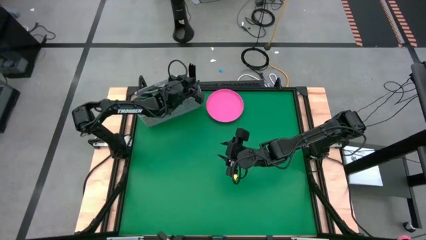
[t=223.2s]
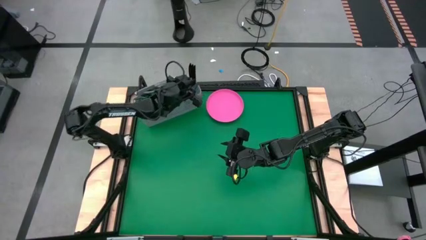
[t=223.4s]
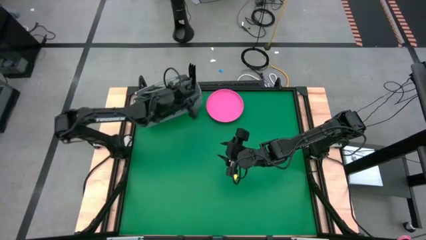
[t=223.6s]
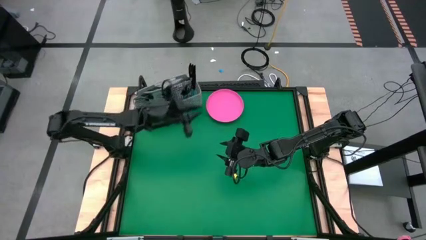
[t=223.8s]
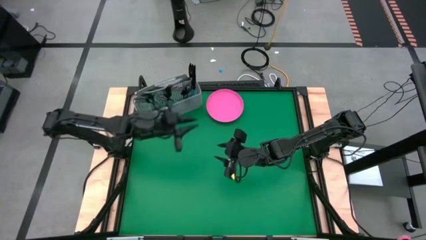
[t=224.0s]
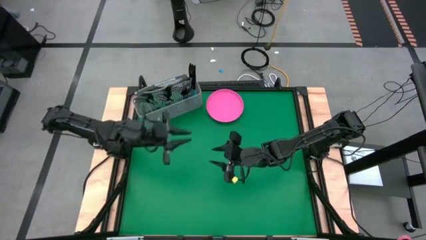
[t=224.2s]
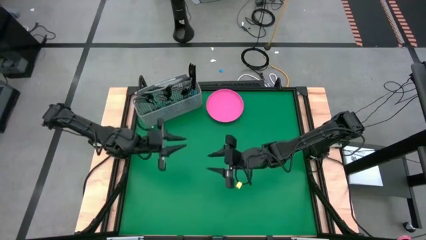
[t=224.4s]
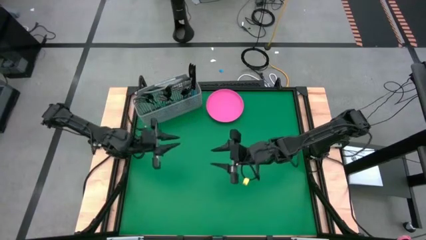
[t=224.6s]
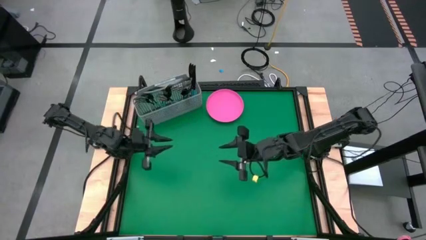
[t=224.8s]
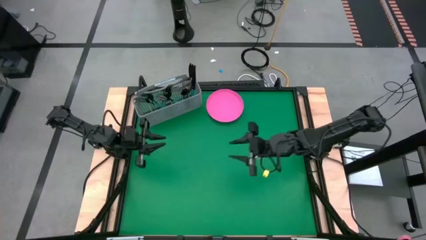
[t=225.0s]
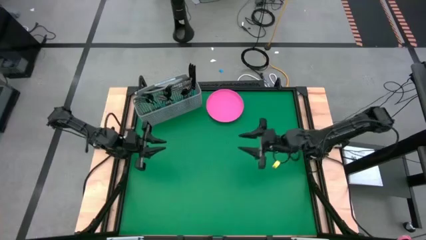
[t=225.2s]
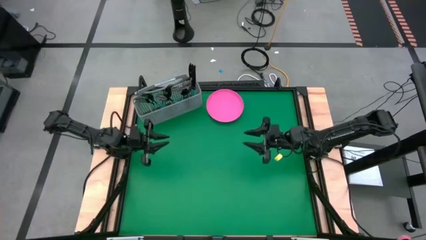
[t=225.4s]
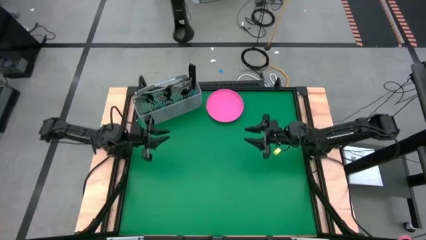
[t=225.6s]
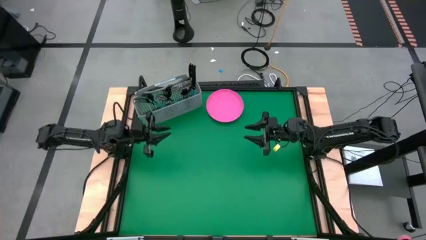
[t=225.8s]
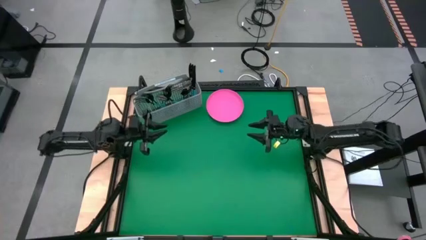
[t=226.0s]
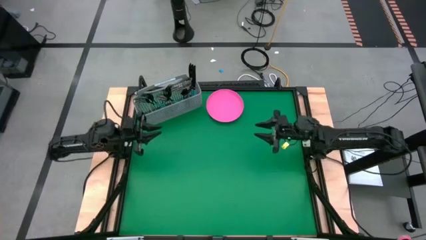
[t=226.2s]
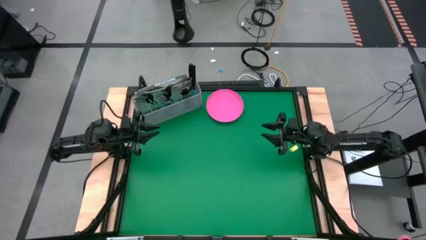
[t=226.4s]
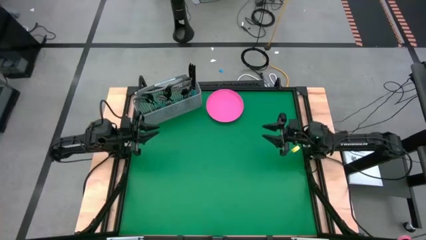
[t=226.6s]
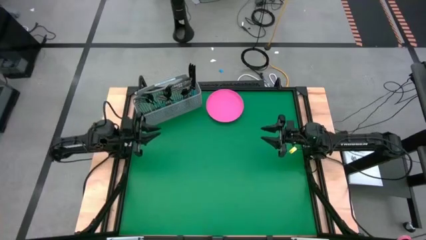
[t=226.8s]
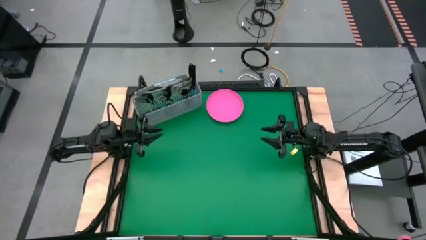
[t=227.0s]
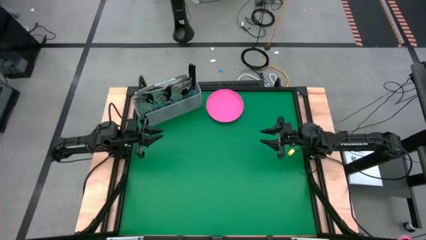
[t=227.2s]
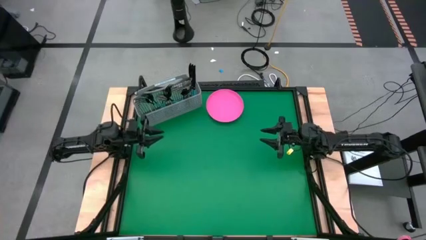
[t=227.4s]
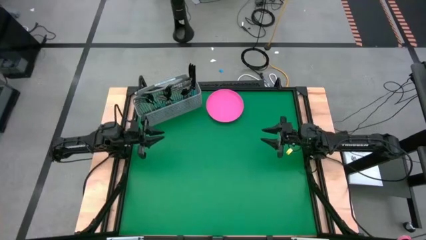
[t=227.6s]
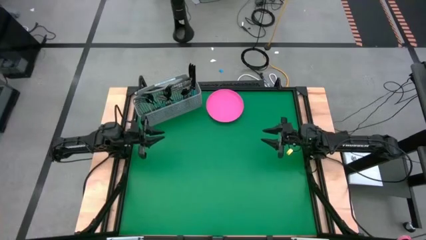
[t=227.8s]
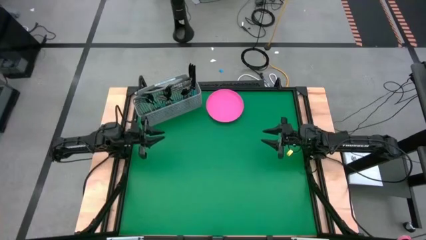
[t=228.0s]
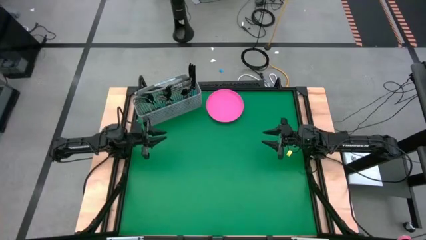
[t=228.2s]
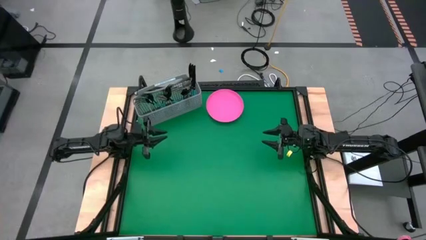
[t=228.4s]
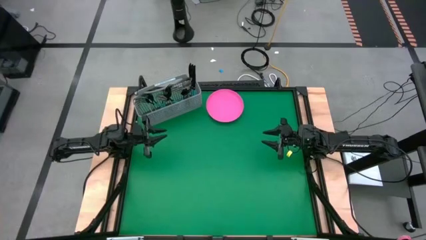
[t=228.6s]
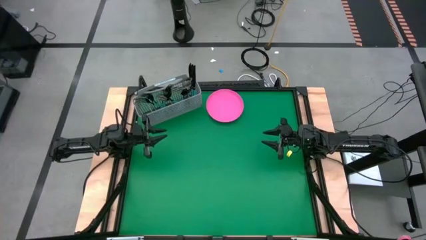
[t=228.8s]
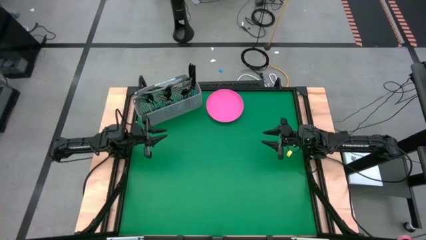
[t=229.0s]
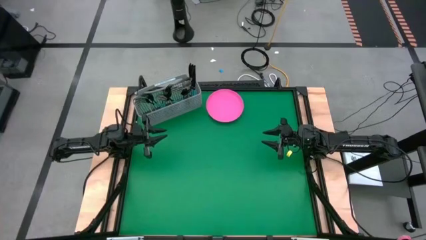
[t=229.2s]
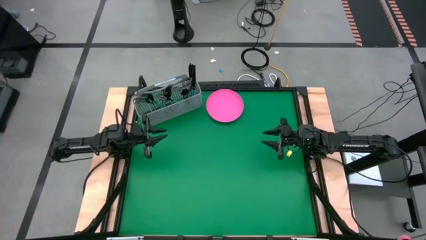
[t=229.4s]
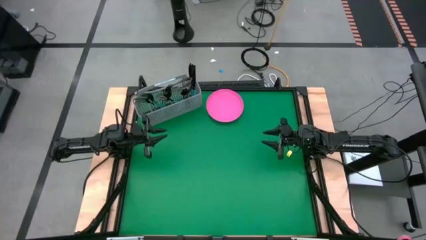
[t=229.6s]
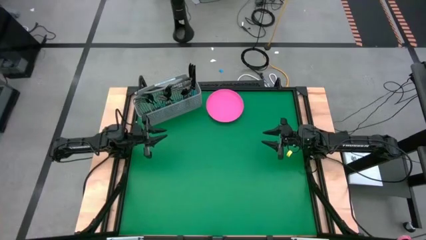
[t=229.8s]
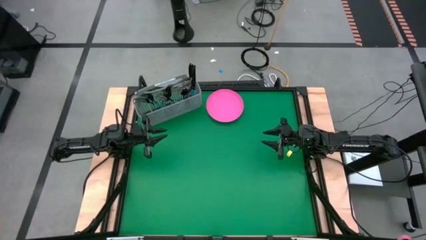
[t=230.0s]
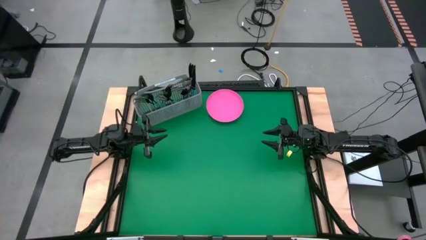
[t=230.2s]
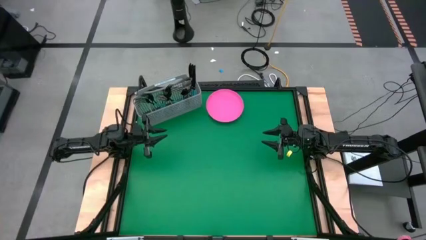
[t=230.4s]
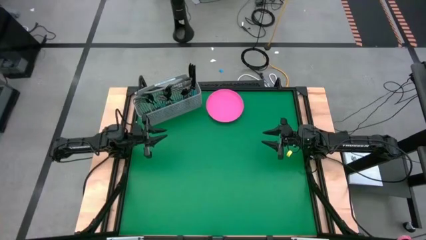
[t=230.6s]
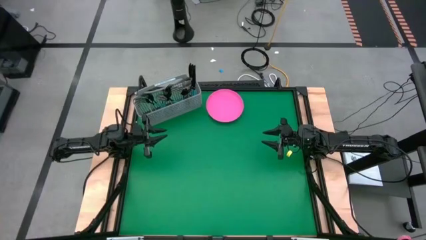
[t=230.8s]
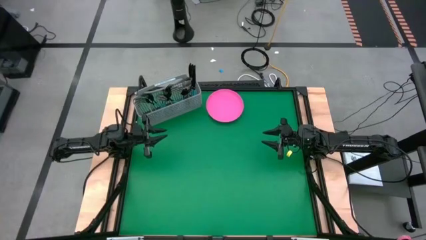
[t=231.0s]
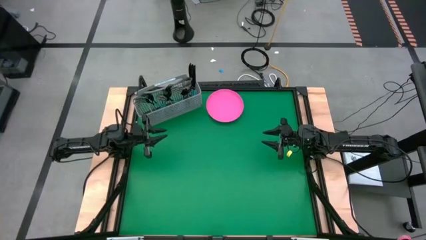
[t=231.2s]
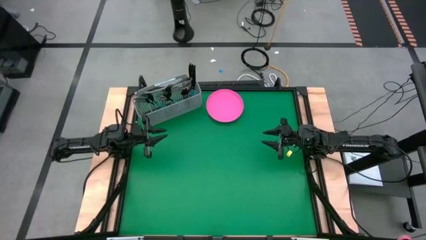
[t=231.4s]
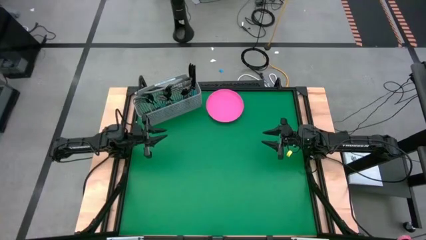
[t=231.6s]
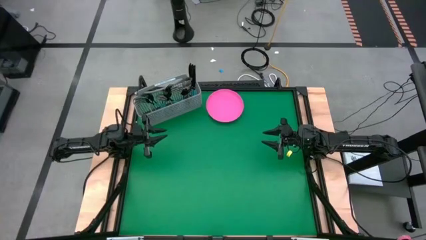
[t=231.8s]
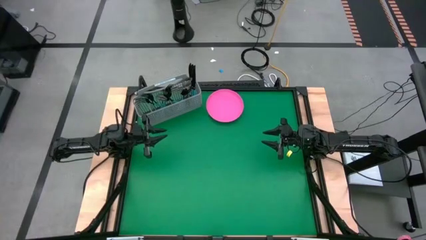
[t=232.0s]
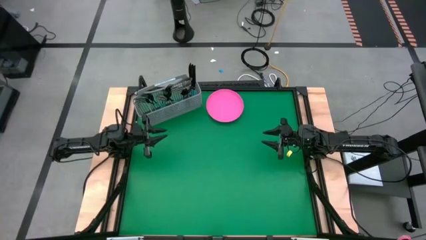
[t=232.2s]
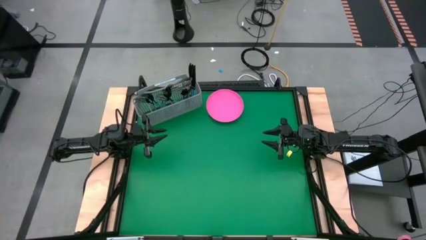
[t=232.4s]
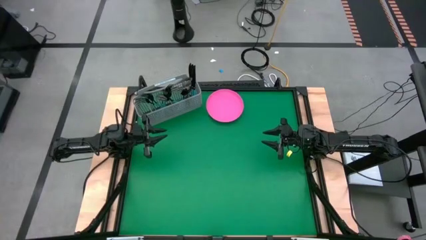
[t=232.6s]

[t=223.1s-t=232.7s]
Task: Sort silverware
Return to Home Position

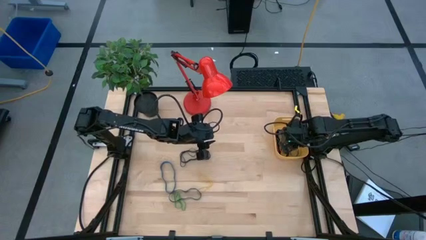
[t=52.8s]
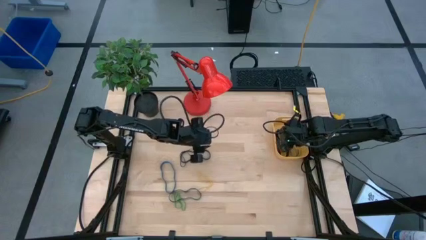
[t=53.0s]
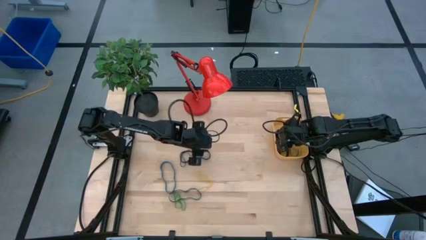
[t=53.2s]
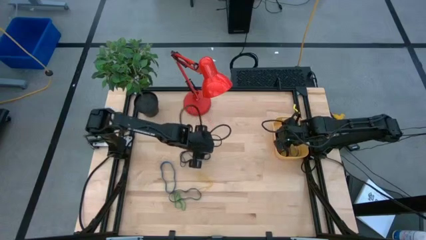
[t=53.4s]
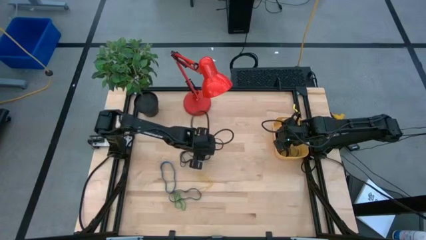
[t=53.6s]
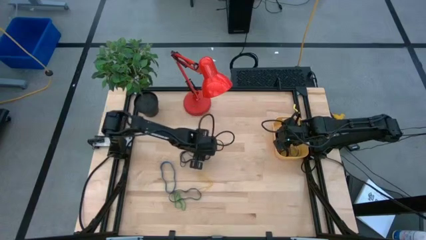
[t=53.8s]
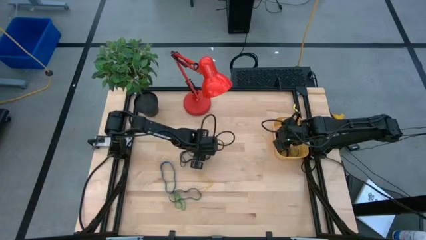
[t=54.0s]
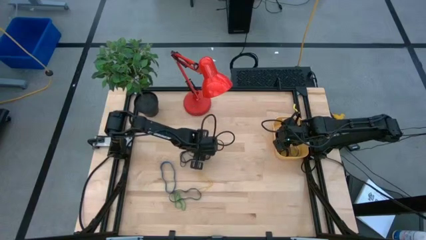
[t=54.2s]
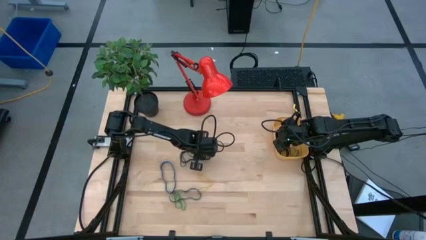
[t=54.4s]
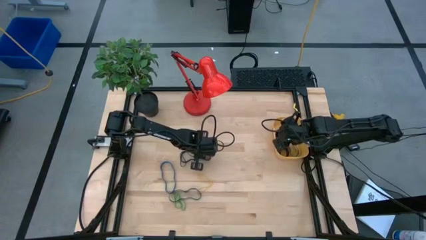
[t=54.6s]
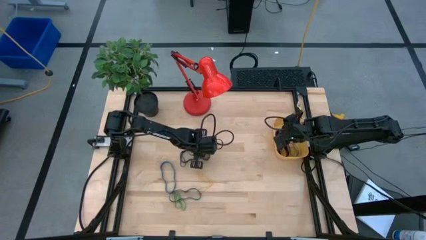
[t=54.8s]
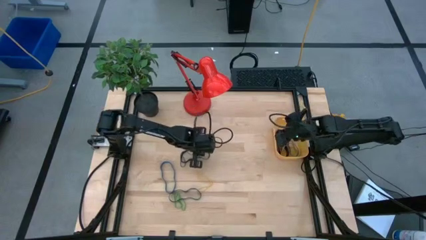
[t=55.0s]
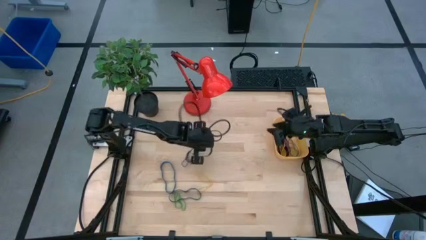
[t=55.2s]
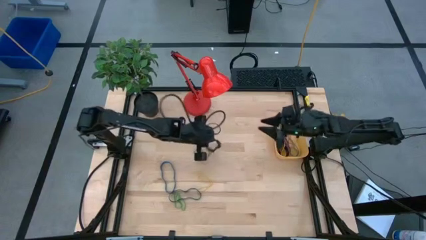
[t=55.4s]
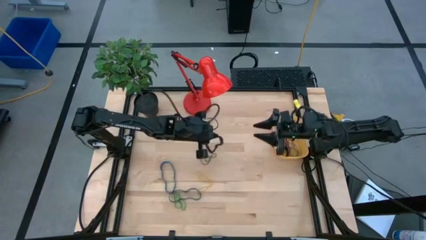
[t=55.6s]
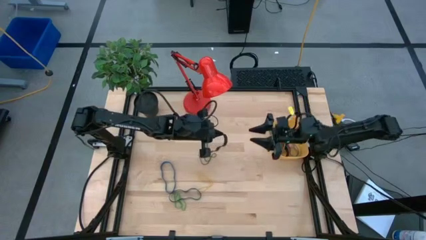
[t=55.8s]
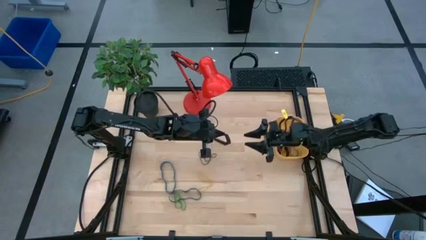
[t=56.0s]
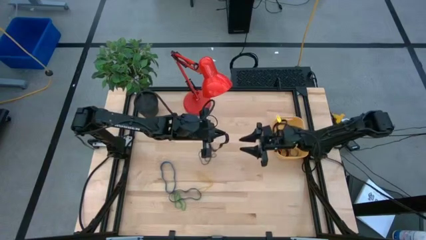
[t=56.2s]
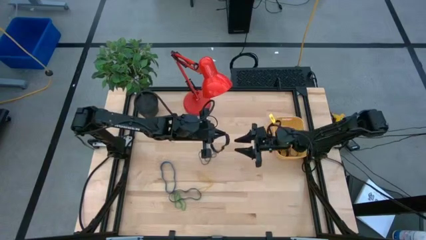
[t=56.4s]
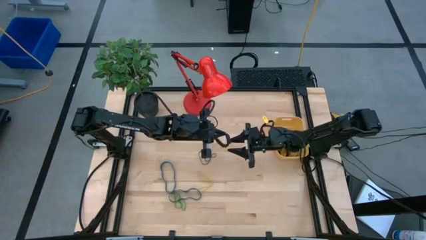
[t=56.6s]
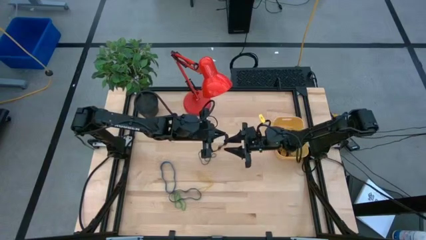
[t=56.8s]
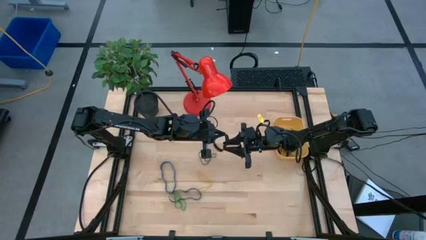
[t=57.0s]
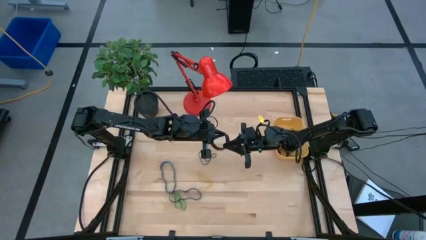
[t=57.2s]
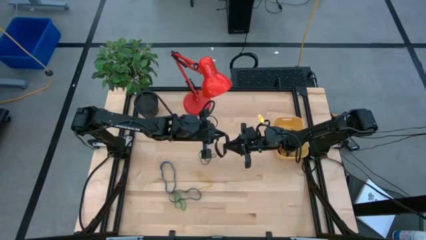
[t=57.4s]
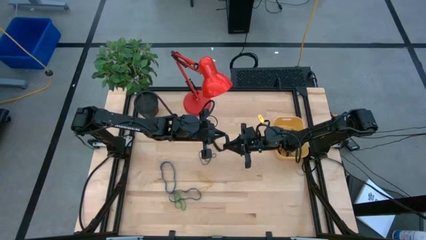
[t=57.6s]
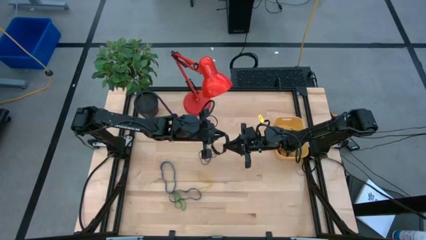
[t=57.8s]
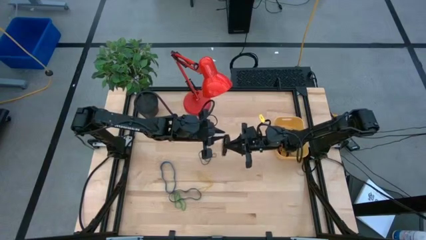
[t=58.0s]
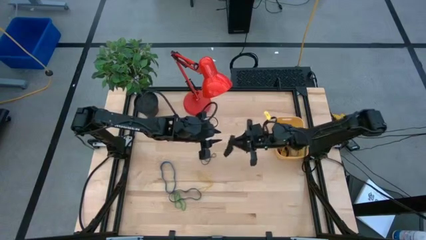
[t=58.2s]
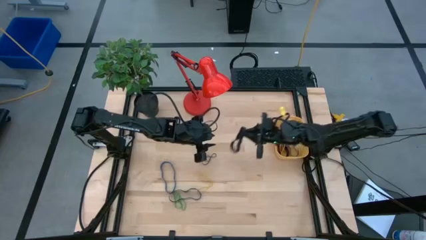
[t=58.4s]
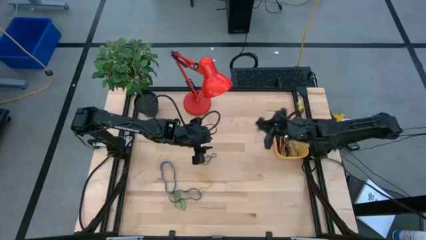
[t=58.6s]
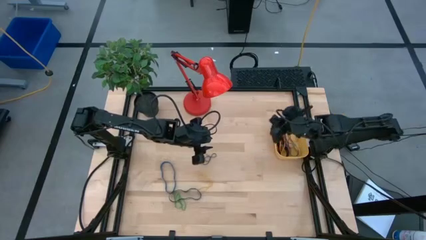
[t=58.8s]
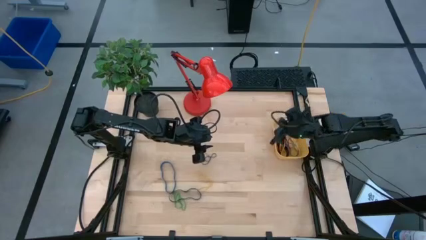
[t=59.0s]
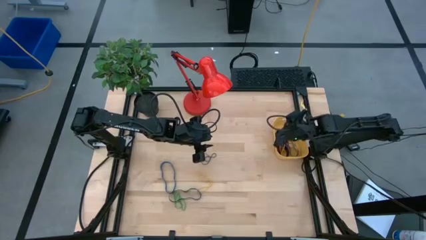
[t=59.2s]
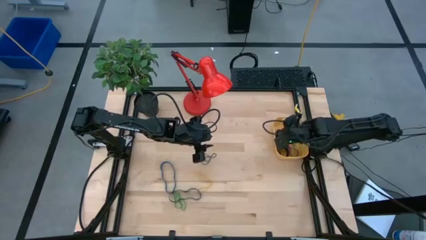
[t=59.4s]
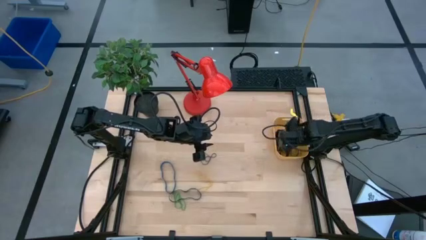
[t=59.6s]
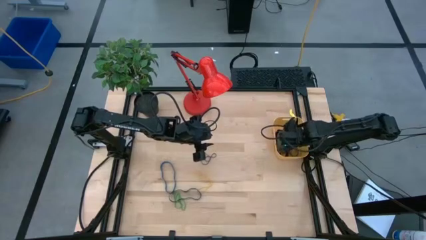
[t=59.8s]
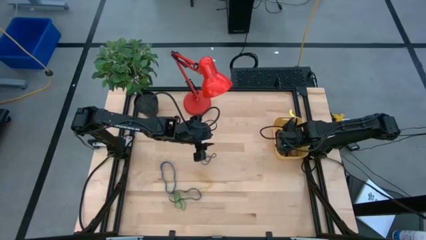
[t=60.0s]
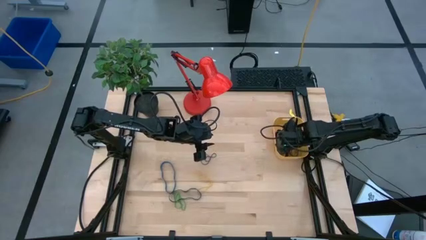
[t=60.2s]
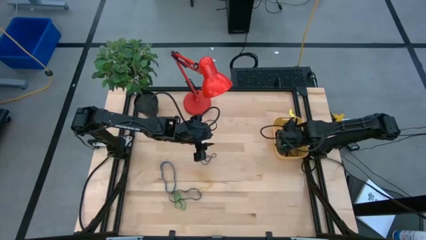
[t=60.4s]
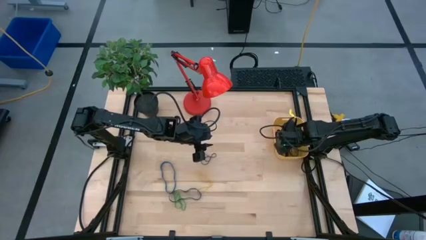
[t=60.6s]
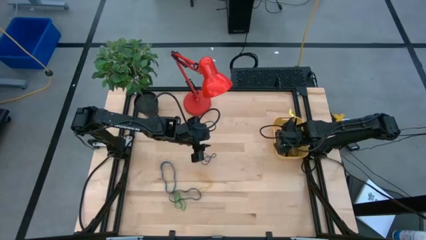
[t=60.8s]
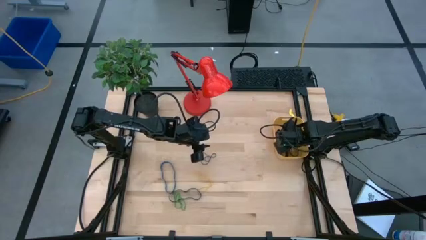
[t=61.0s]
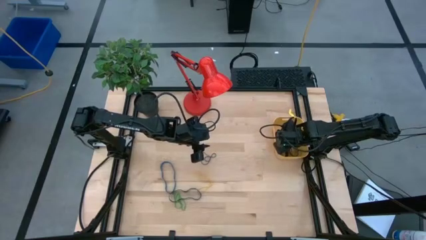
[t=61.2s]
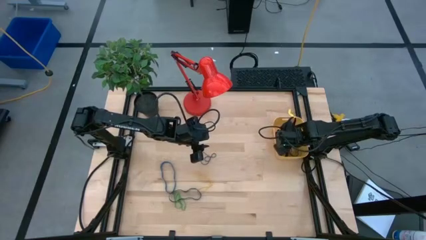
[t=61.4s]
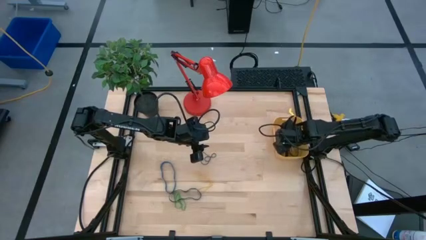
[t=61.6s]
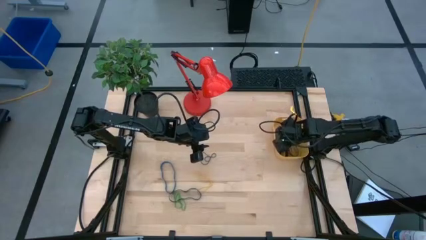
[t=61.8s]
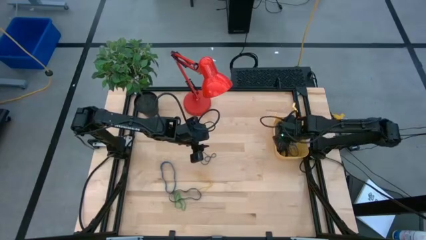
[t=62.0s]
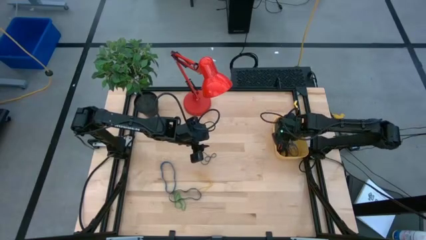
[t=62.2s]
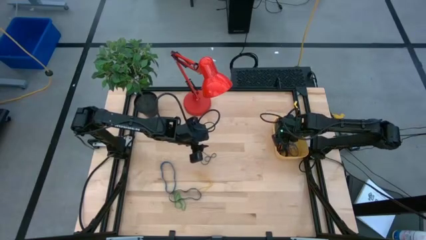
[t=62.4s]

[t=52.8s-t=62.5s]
Task: Pick and place rubber bands into bin
Put the top black rubber band into the yellow bin
